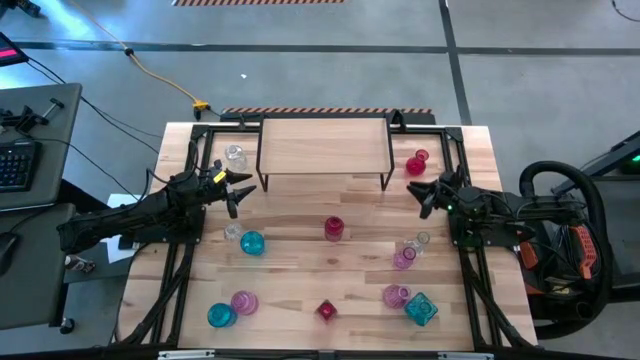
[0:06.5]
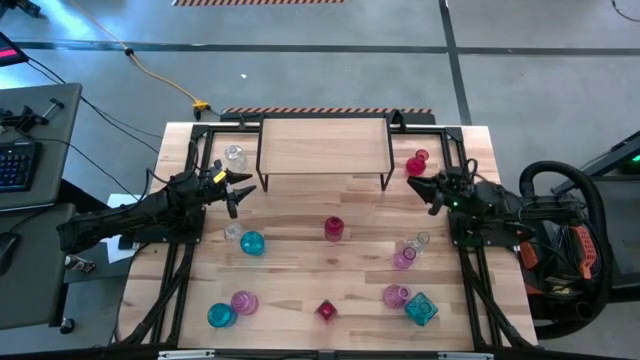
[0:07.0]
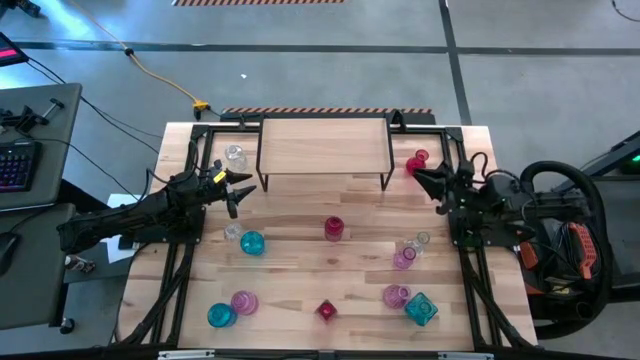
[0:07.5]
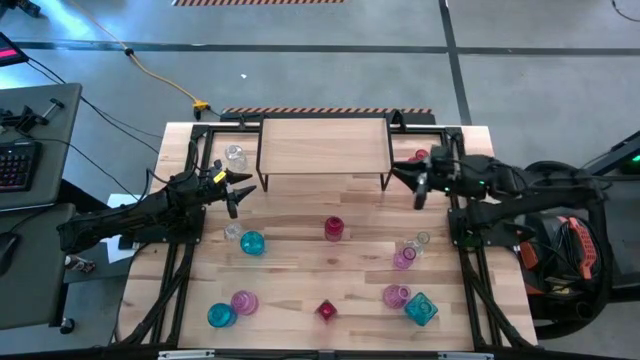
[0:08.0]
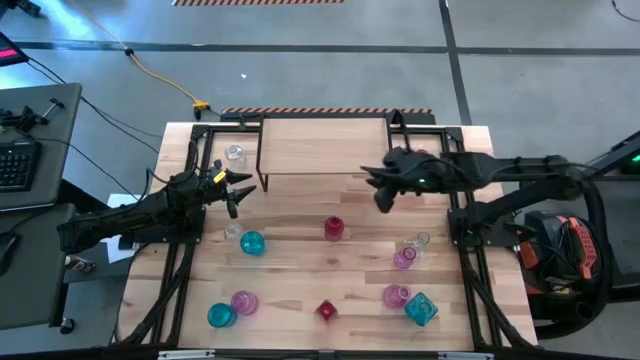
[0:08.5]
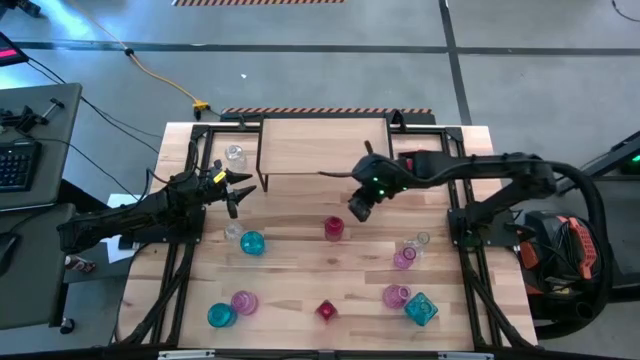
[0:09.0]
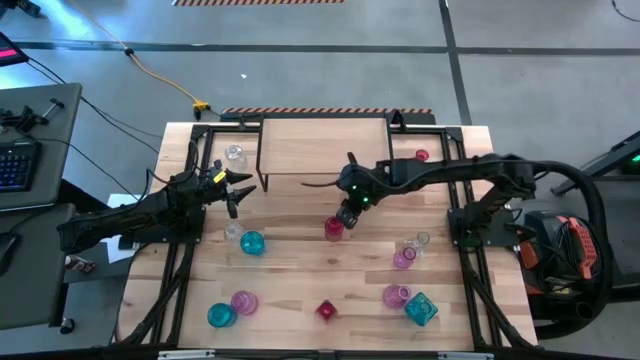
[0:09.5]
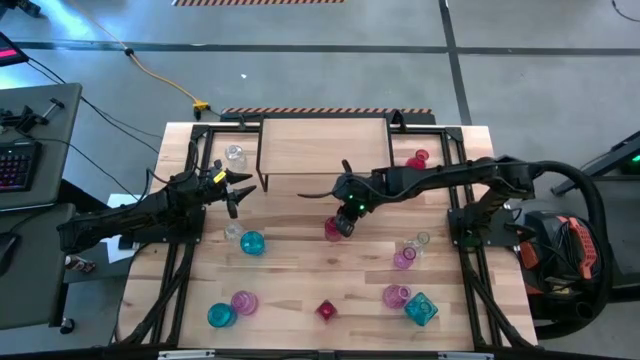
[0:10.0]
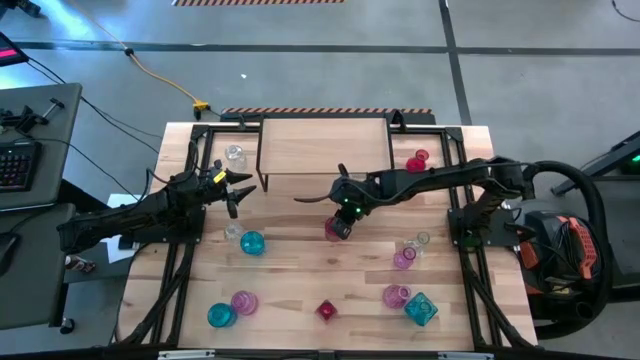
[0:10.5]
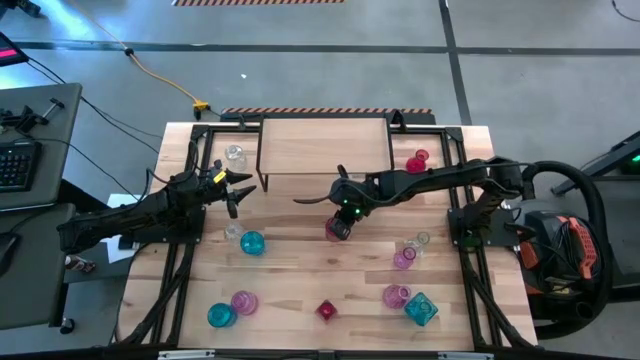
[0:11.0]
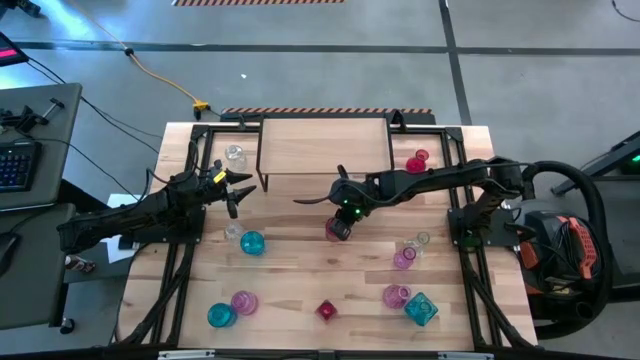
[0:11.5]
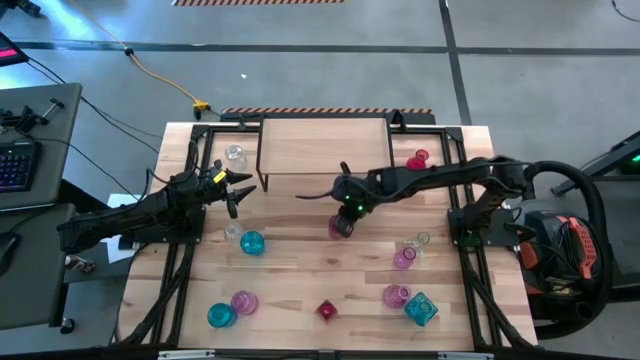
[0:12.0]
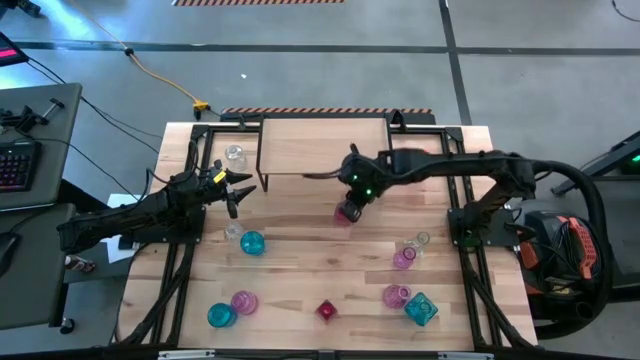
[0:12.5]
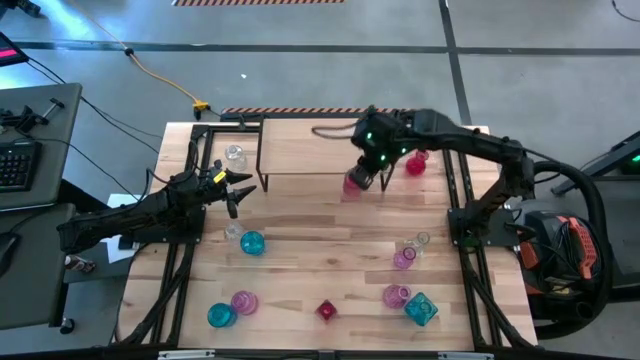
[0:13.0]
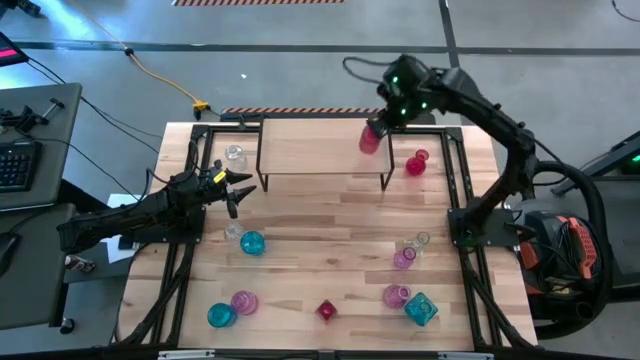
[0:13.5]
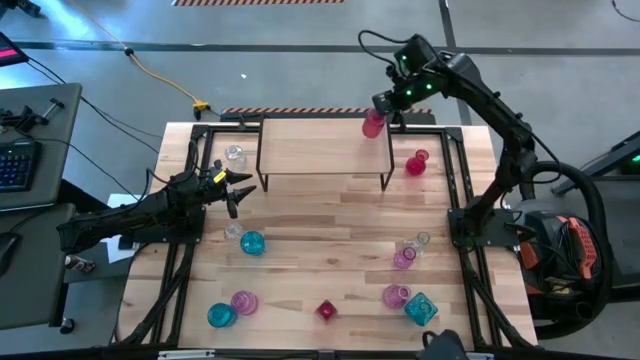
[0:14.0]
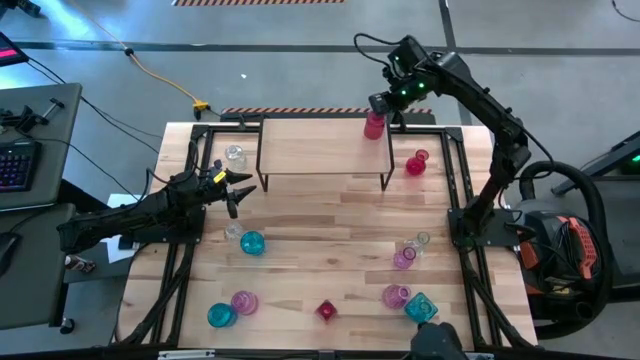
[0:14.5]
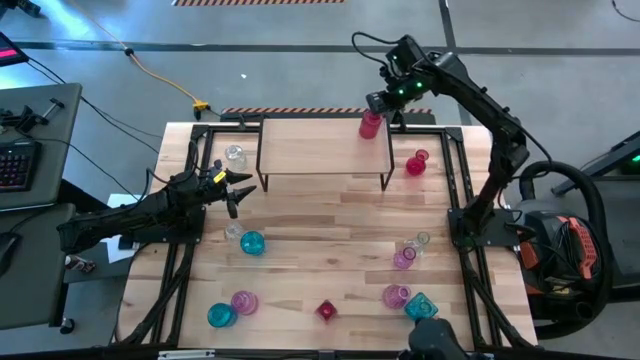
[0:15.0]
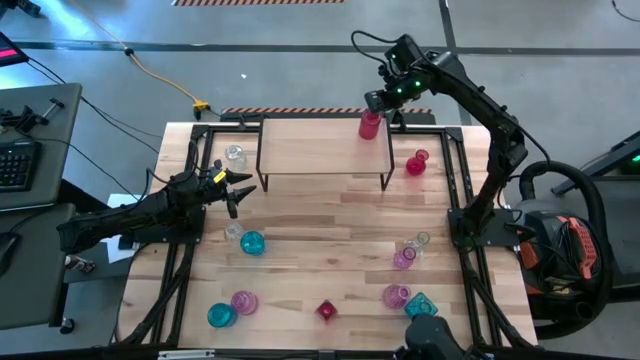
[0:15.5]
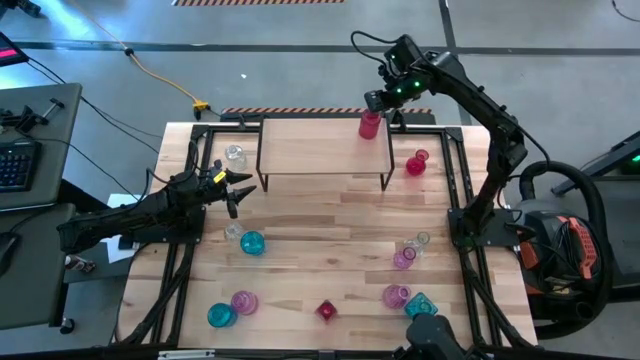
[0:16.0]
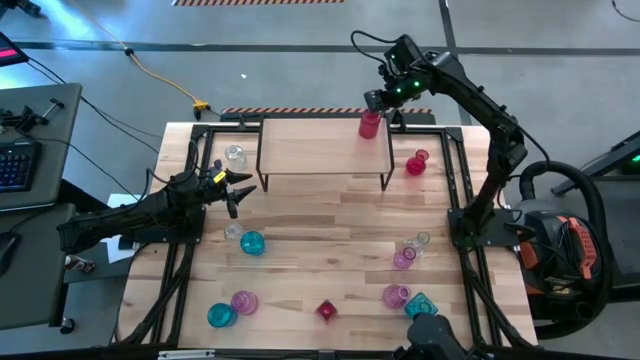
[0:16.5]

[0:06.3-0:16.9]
Task: sort vases onto shelf
Put the center red flower vase on the top shelf

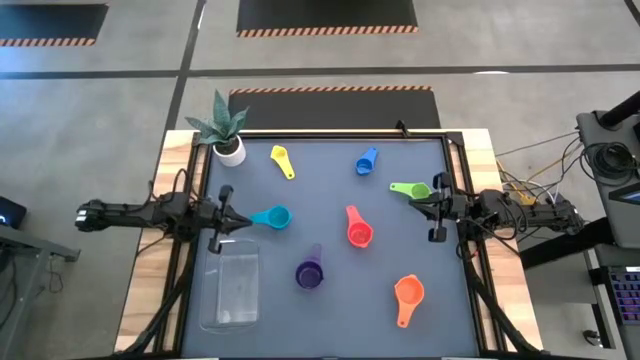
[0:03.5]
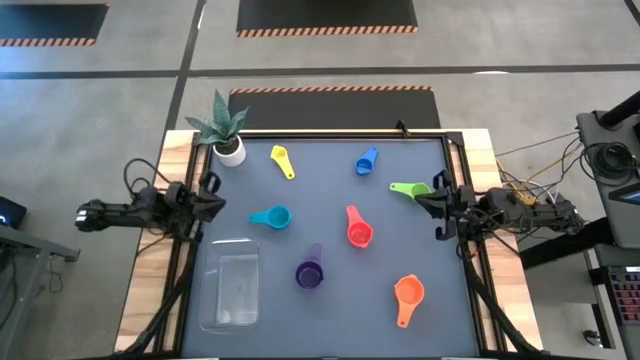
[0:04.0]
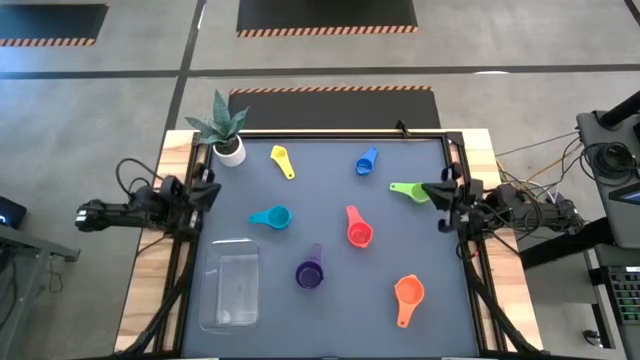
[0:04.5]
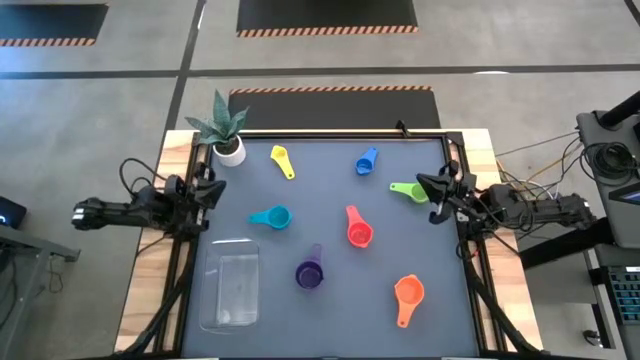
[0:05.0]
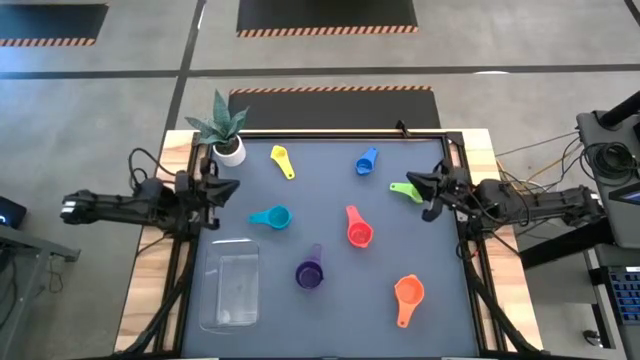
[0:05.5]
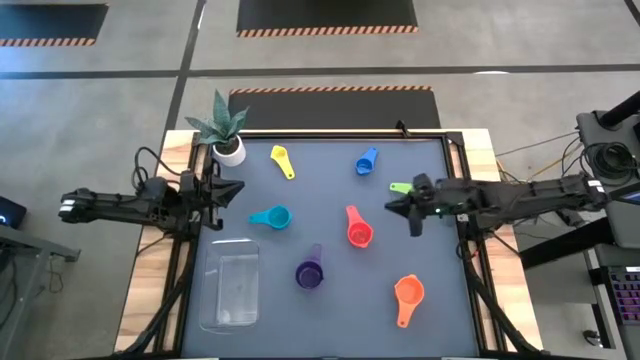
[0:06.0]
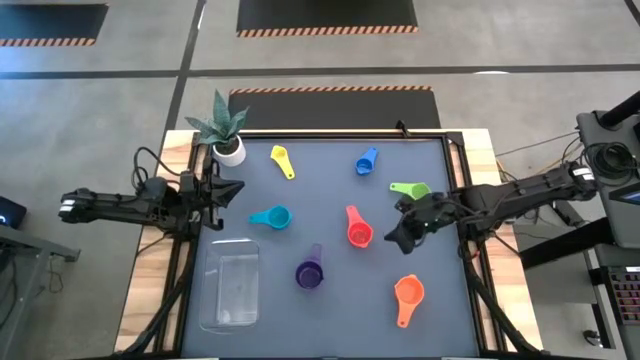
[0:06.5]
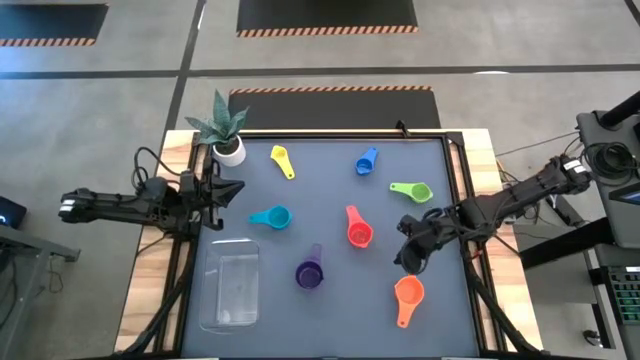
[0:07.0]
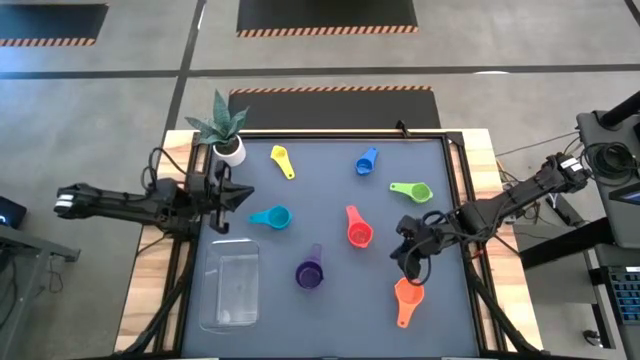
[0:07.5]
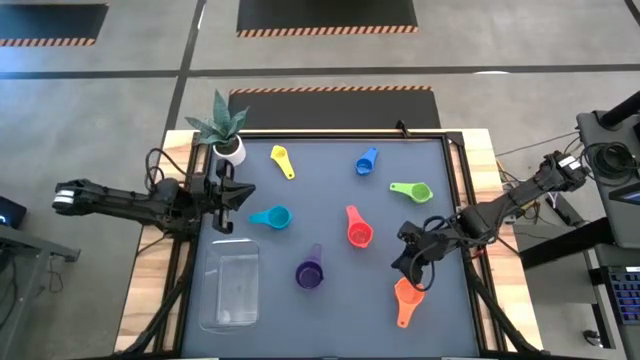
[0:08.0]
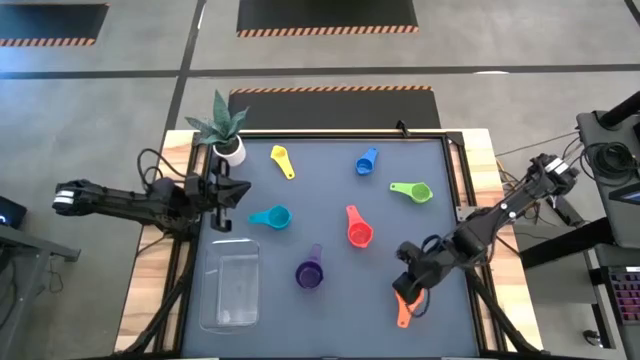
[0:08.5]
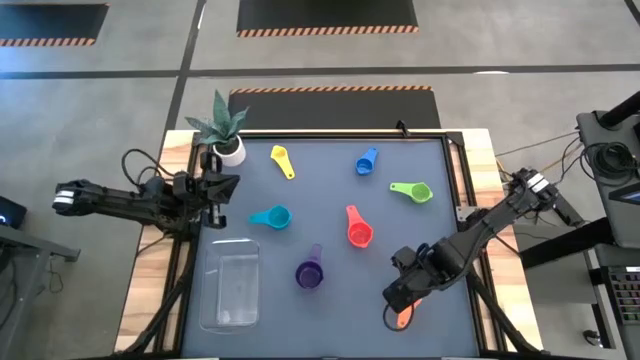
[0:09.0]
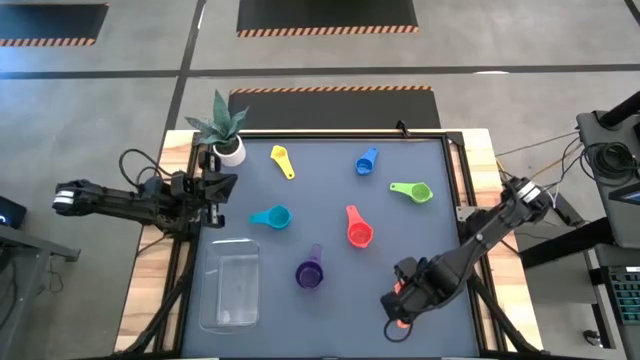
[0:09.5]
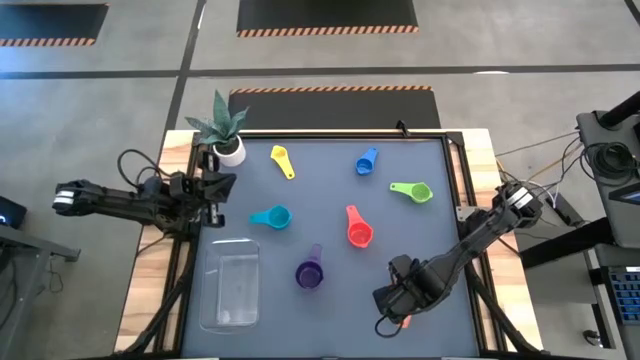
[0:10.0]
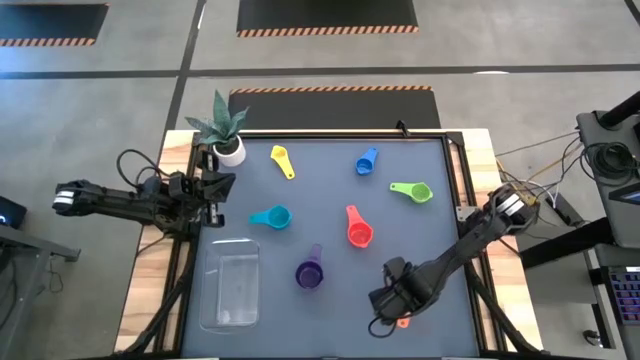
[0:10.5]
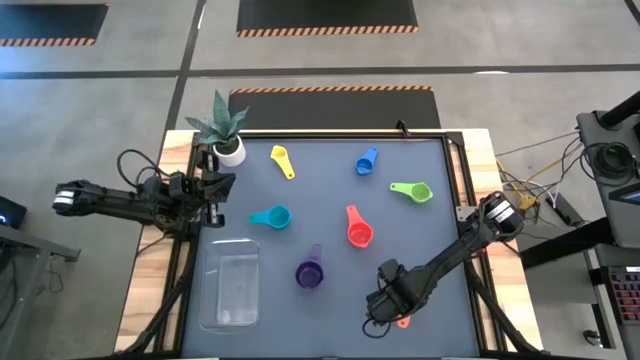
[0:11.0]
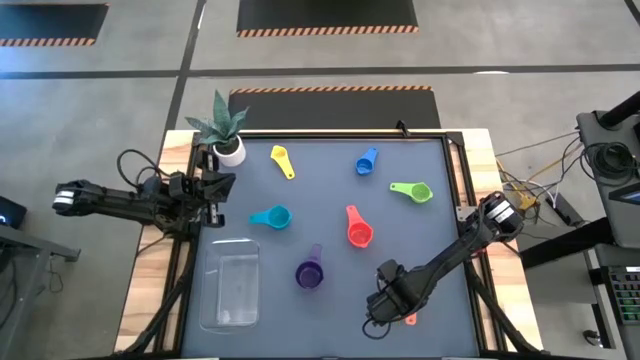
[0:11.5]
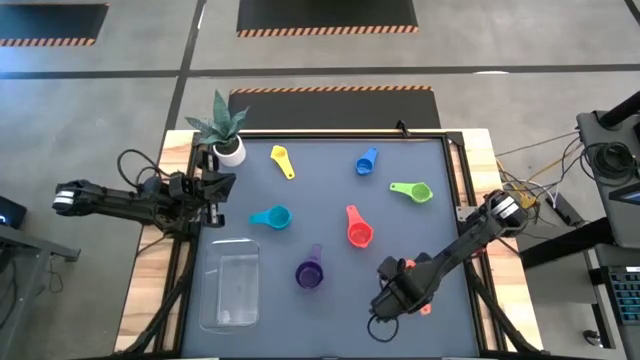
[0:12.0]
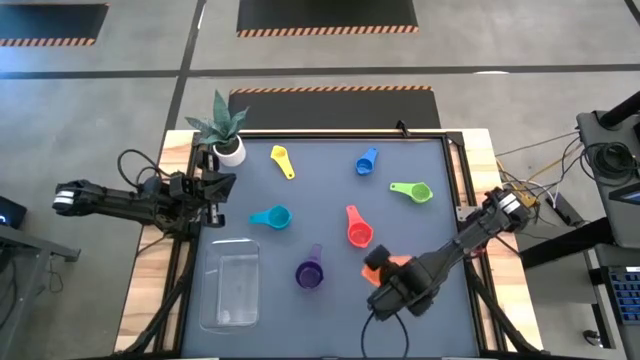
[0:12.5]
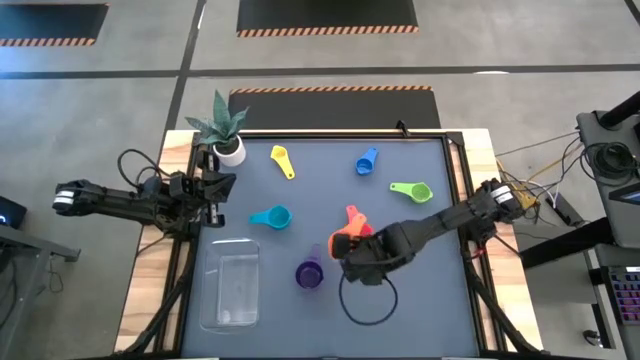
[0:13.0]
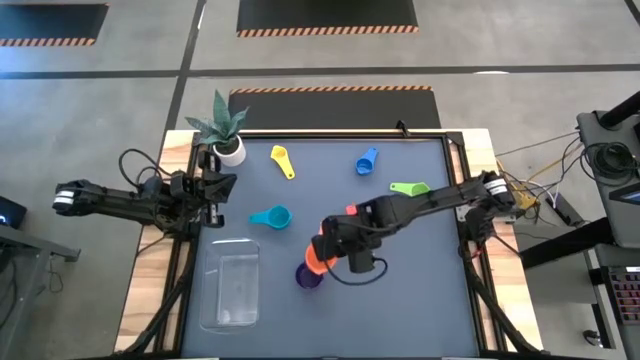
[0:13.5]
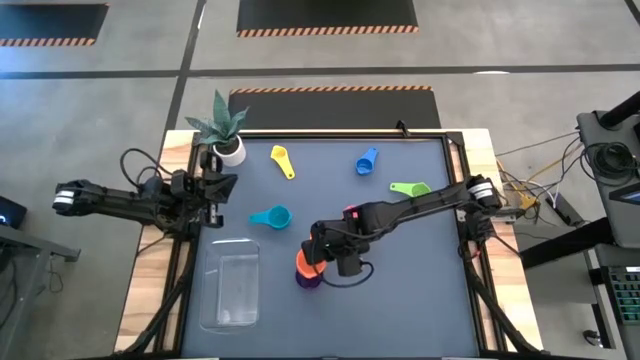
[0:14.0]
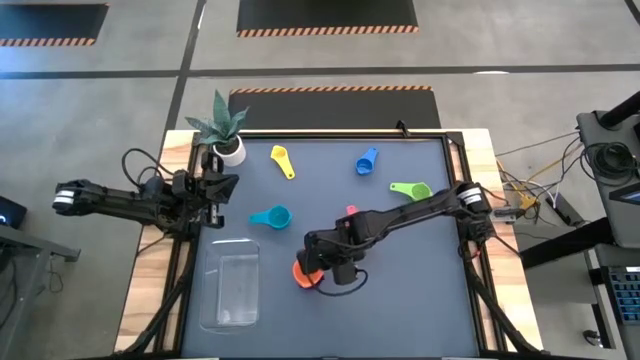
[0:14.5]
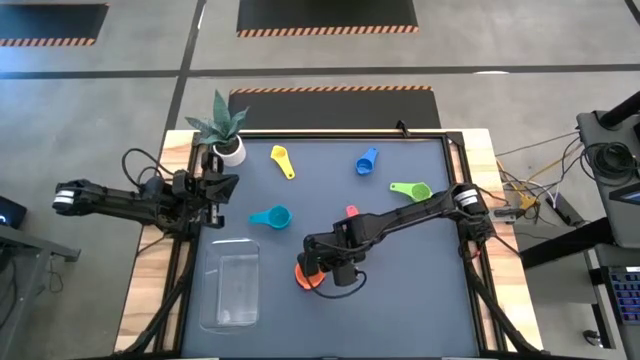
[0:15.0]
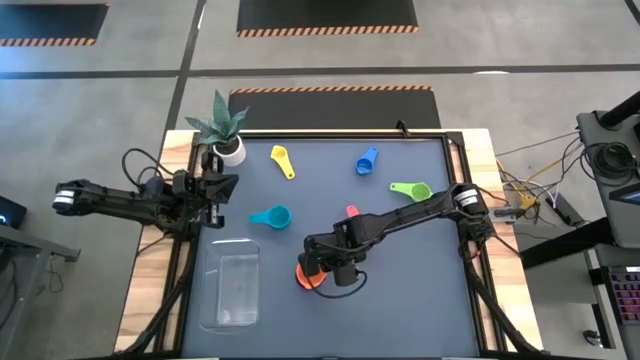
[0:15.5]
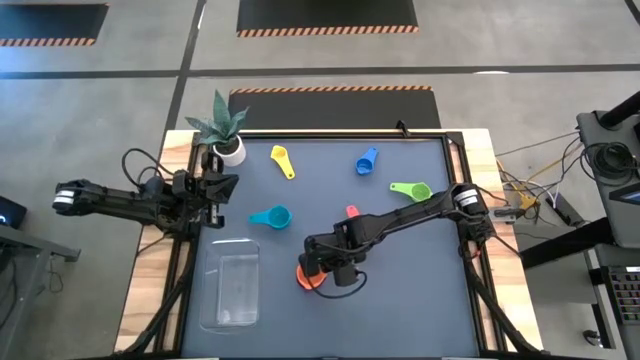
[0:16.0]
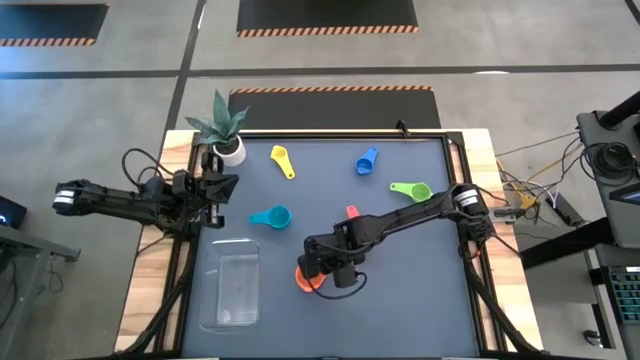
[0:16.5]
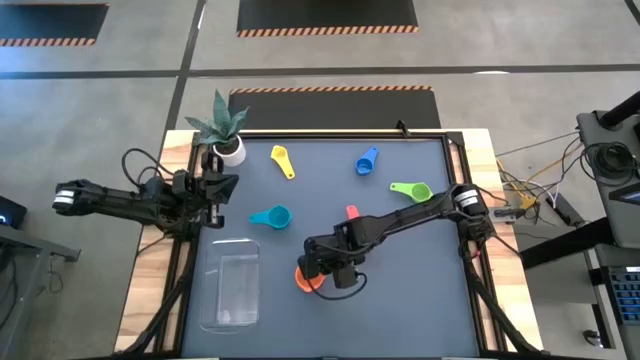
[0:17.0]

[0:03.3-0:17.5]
Task: Nest measuring cups in basket
Stack the orange measuring cup on top of the violet measuring cup
